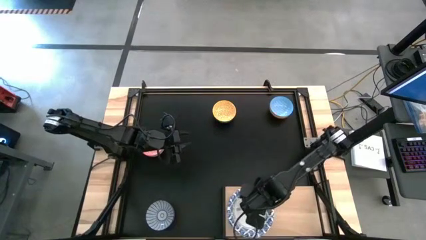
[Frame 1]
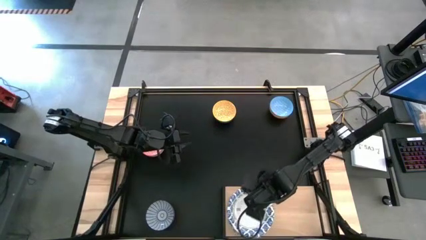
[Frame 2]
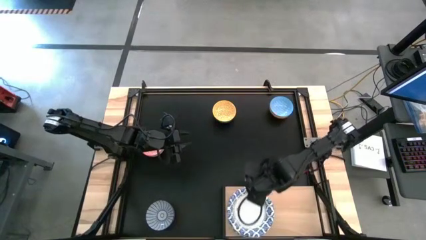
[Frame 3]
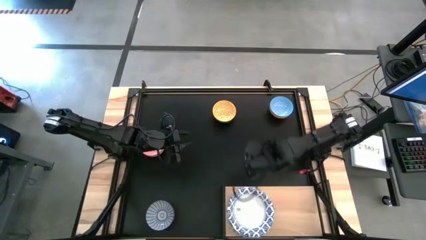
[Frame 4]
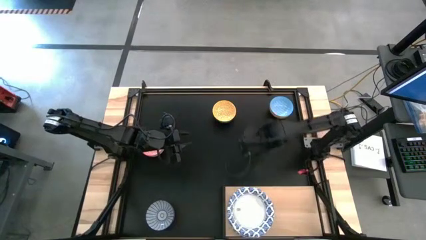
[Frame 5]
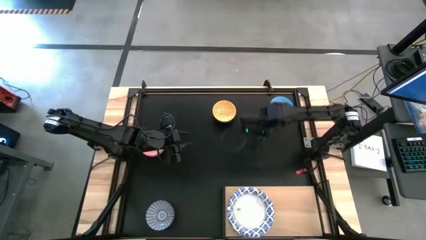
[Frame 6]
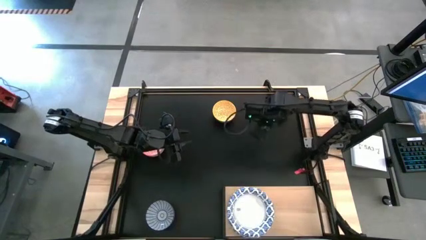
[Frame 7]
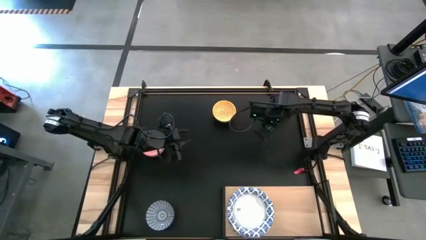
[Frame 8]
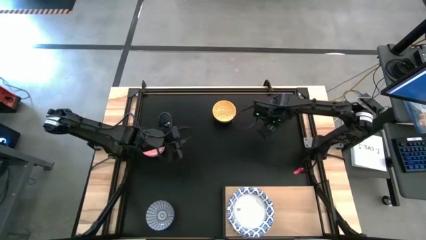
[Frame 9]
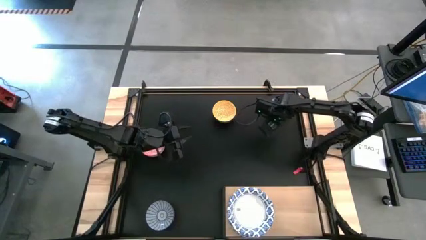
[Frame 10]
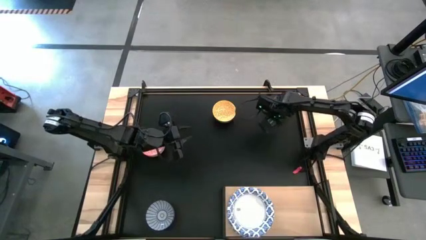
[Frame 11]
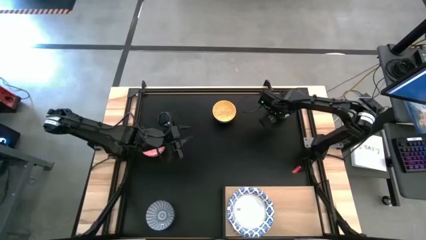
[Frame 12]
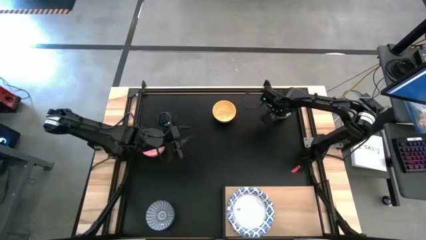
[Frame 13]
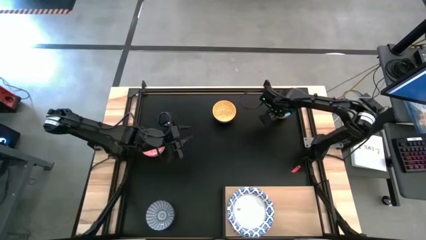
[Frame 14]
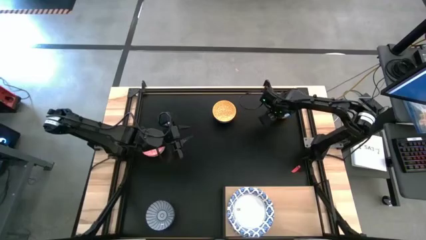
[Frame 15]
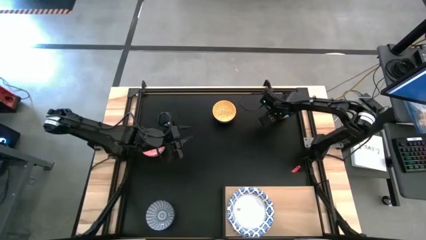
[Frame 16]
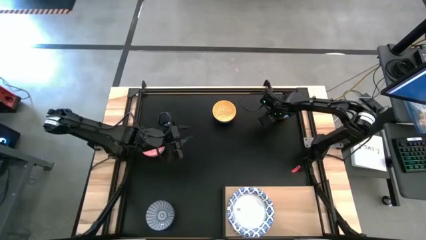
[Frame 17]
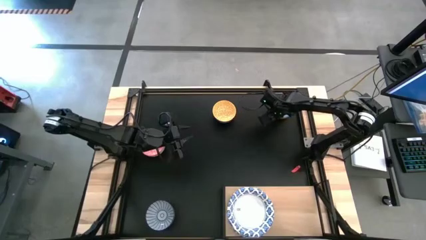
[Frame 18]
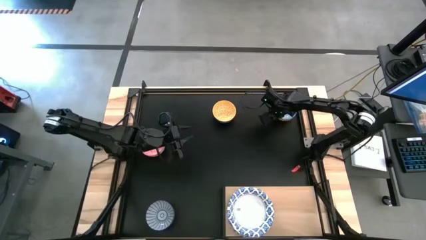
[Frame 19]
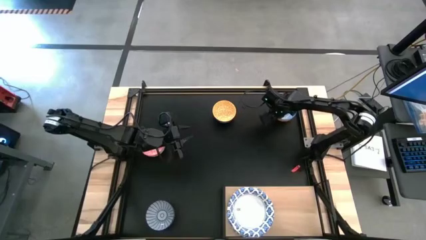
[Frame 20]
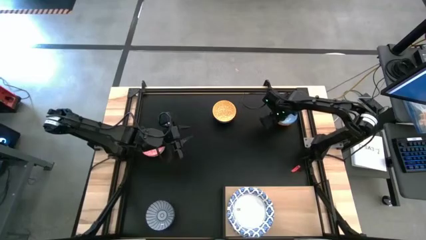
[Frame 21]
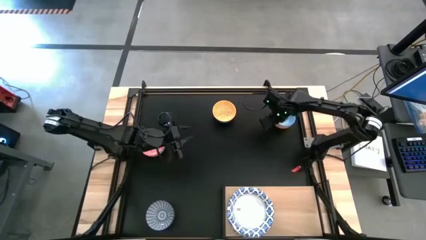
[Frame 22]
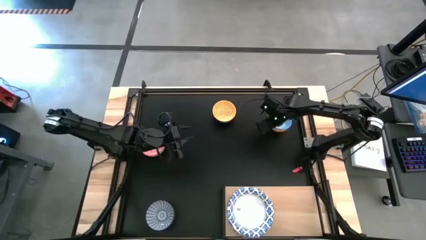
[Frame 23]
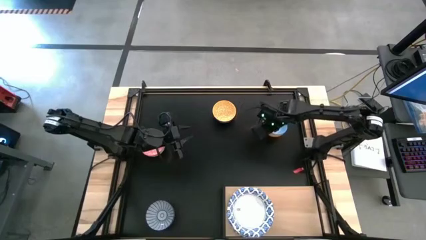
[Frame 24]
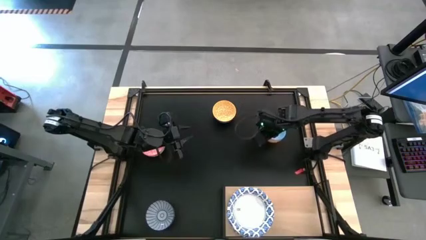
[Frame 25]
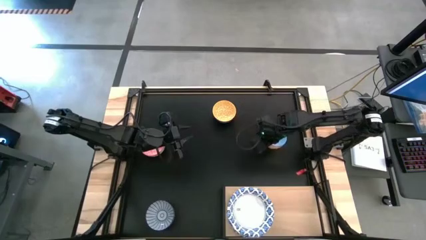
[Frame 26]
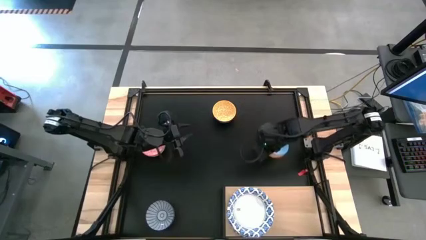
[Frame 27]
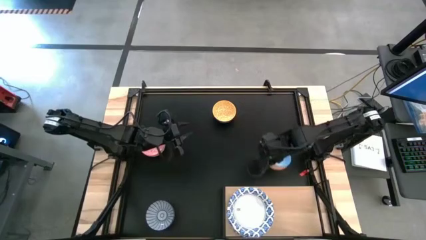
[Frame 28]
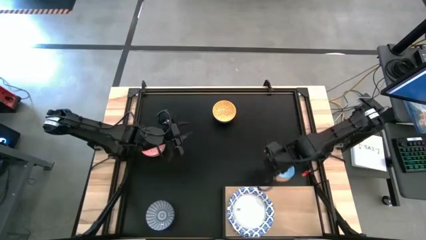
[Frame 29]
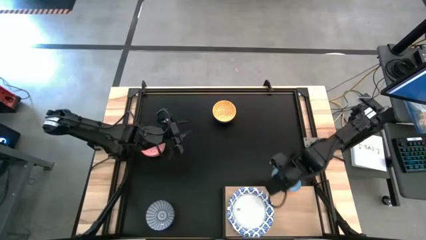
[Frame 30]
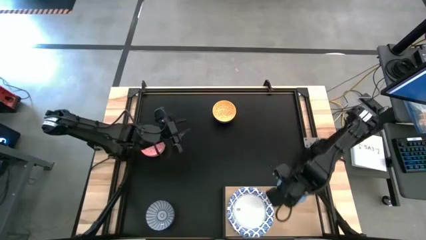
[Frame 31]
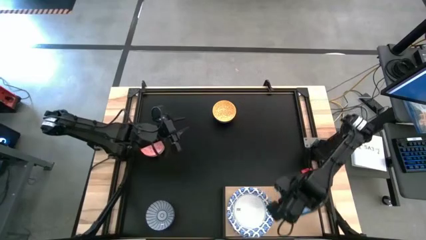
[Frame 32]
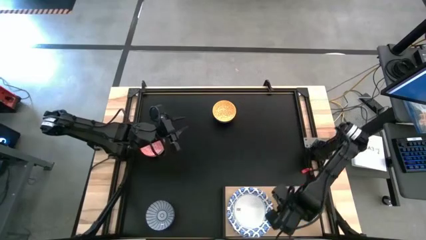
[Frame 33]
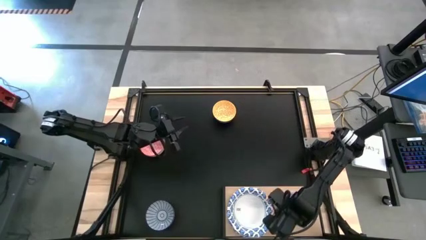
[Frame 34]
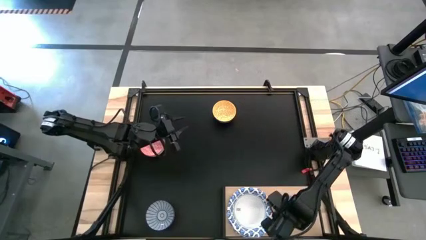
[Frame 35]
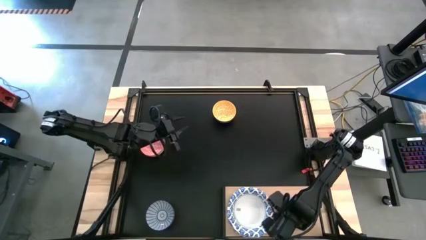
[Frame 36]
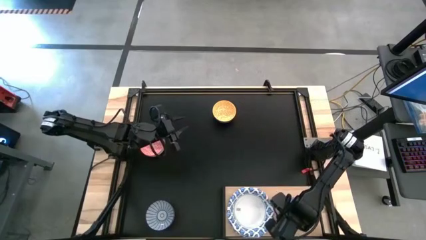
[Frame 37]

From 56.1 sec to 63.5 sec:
Task: Place and stack bowls onto a shelf
Put the blue bowl on the shelf

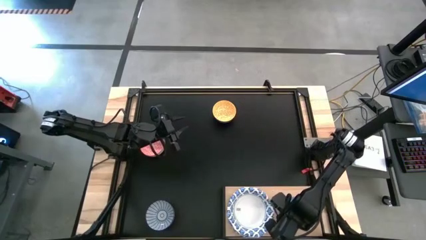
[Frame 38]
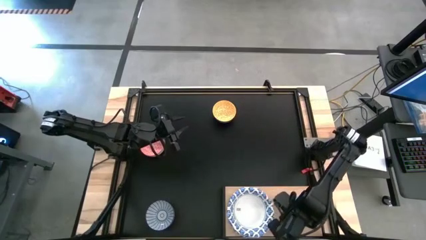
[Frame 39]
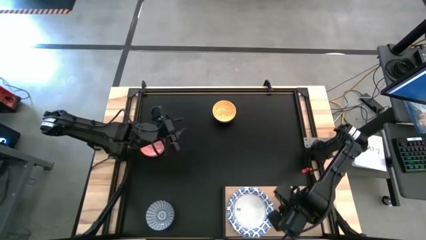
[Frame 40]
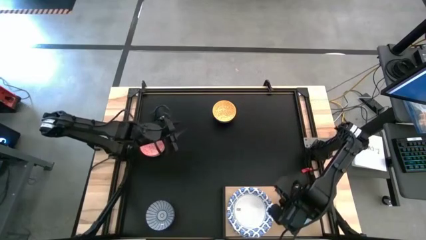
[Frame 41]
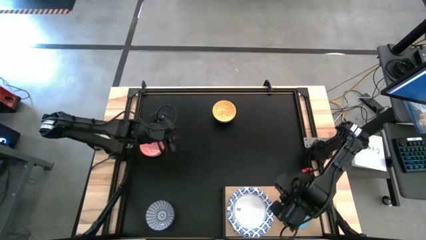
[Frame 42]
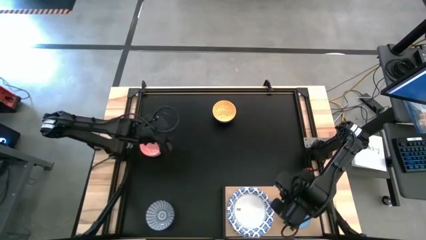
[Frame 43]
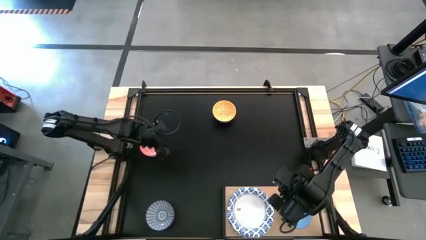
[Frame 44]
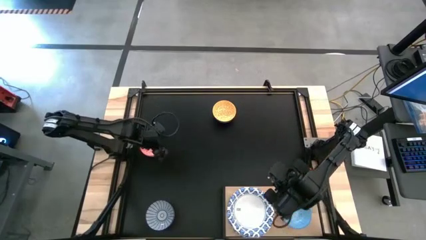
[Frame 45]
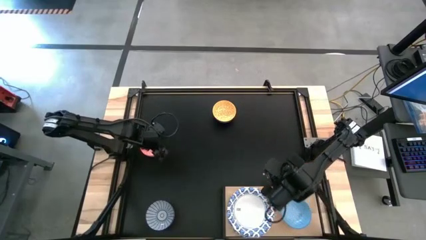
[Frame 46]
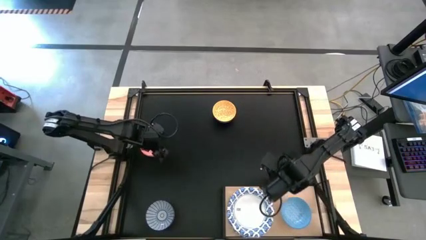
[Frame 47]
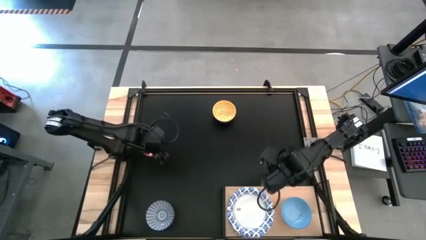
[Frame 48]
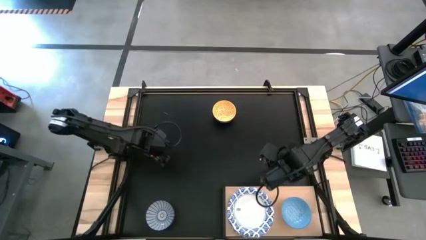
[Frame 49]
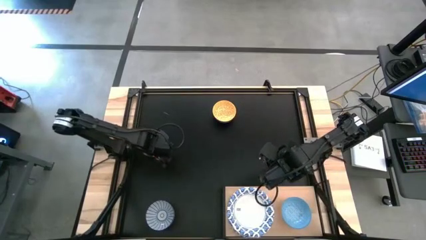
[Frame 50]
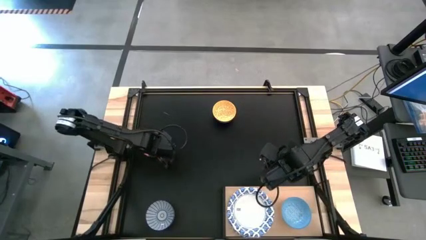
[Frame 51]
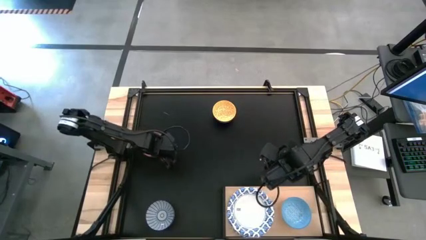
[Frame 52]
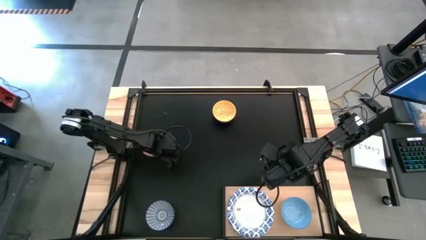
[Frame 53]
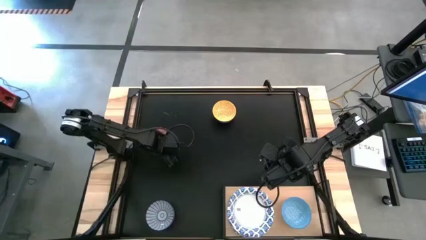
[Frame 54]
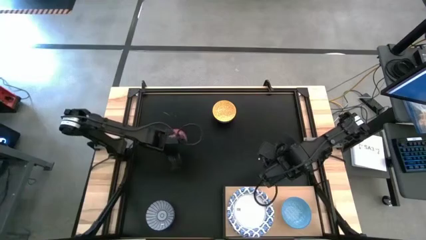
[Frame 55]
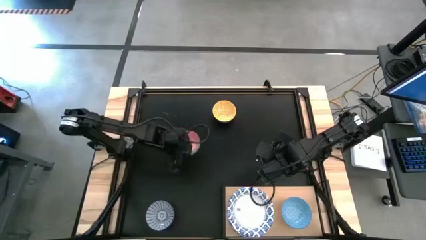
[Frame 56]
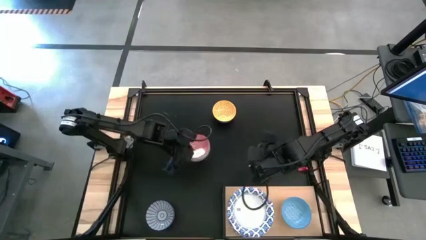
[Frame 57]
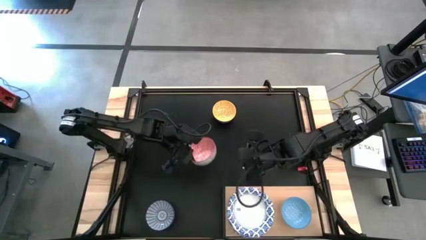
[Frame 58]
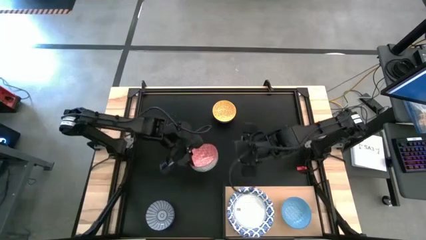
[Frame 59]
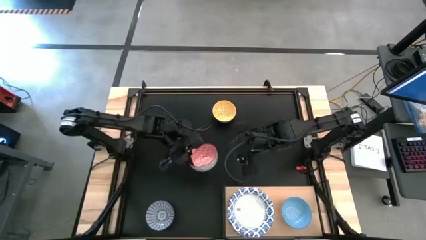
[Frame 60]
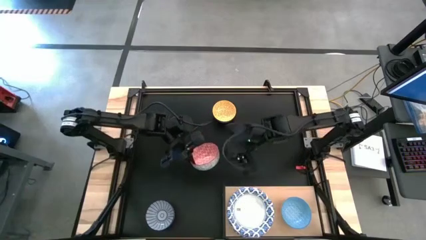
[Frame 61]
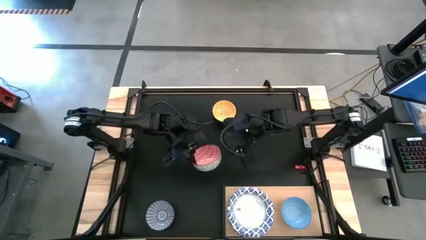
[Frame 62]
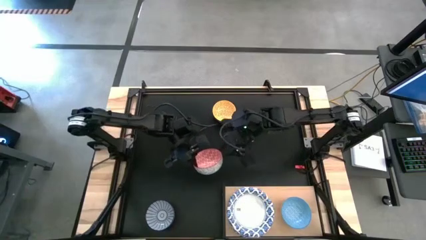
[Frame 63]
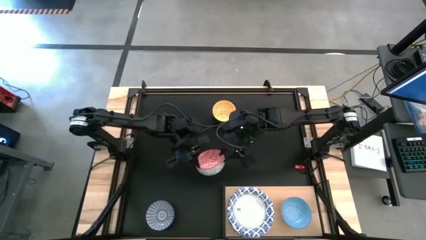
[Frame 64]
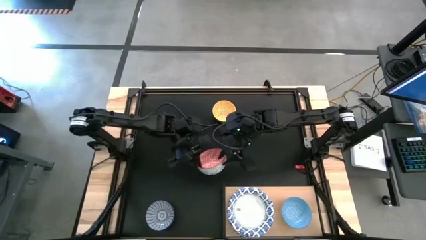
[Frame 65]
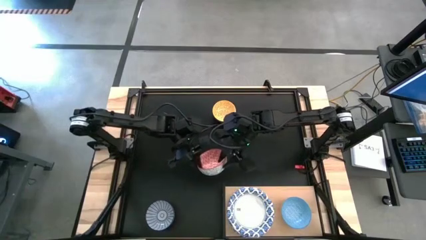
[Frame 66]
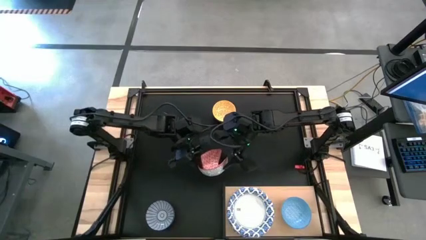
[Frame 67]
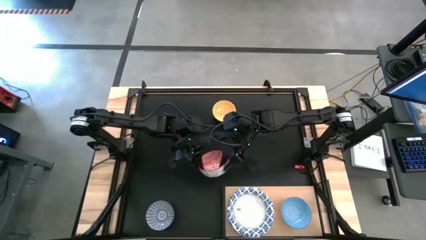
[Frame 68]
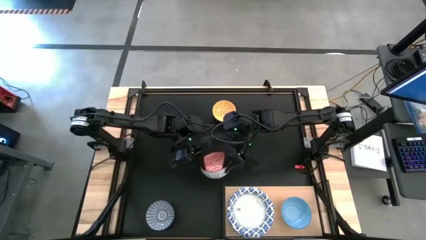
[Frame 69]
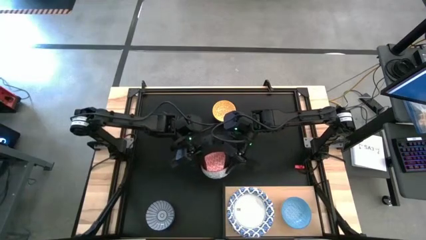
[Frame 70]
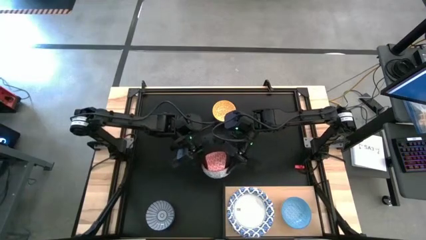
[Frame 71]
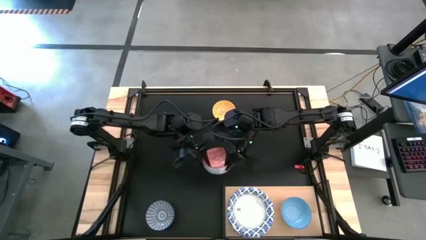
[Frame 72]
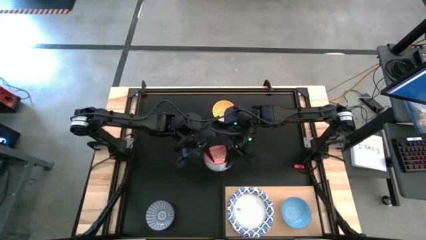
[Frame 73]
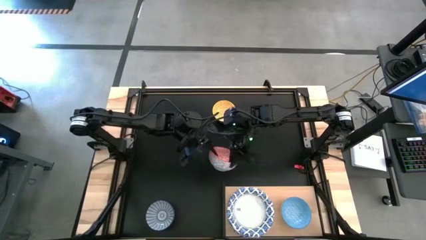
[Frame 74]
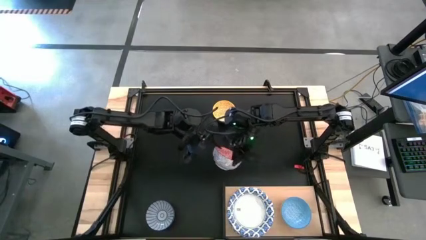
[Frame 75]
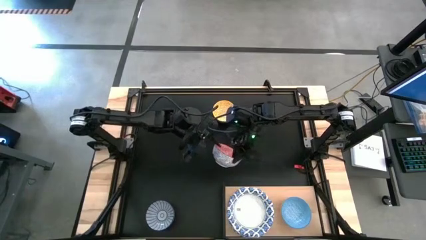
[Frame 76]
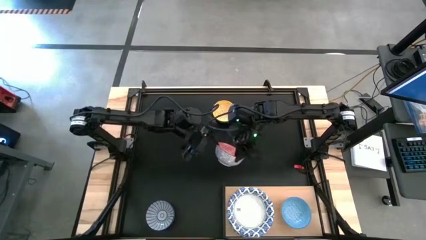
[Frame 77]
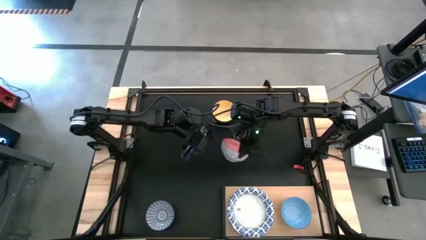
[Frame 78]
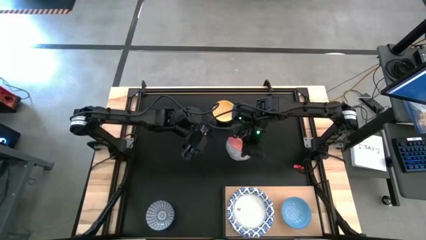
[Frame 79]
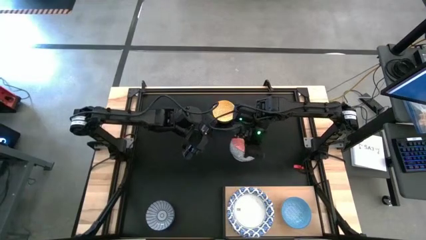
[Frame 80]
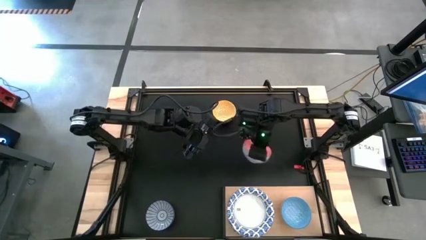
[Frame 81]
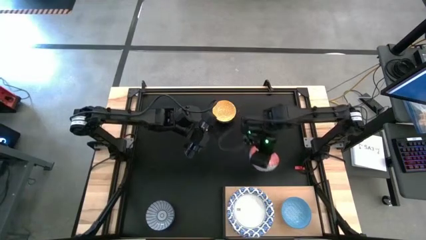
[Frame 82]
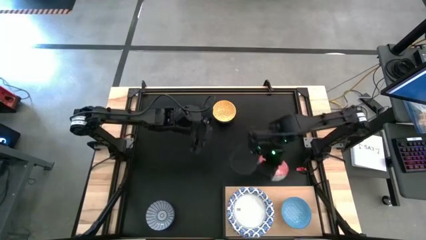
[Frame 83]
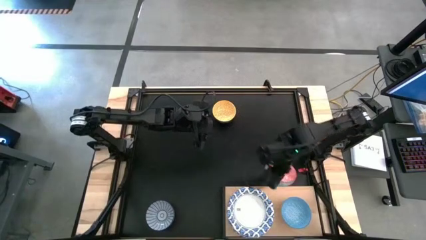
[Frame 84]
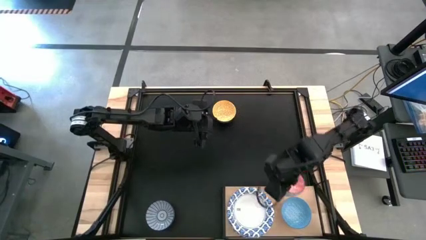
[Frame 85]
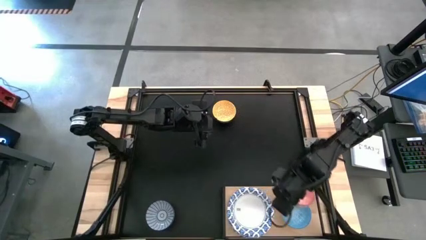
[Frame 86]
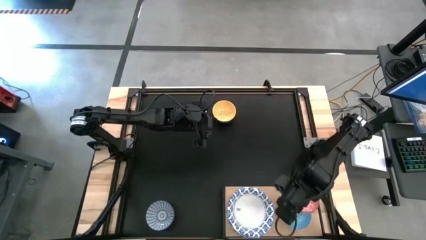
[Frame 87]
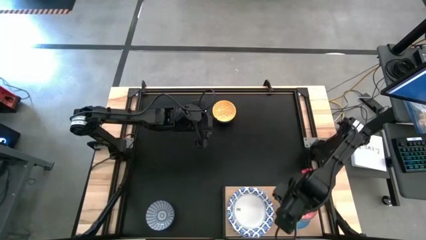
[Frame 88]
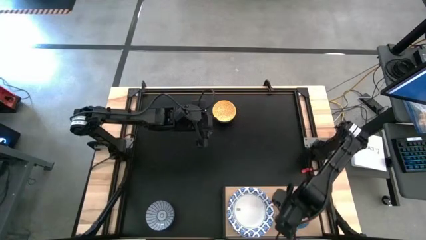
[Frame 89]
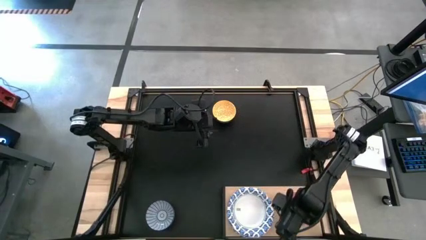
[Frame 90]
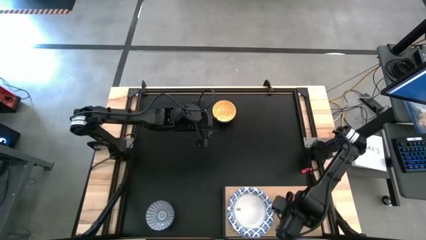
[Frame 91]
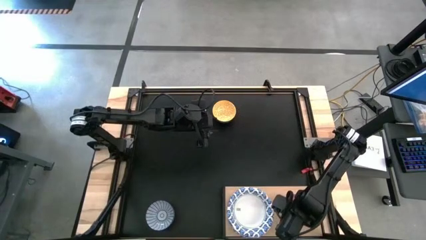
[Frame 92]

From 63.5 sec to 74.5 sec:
Stack the red bowl on top of the blue bowl on the shelf
